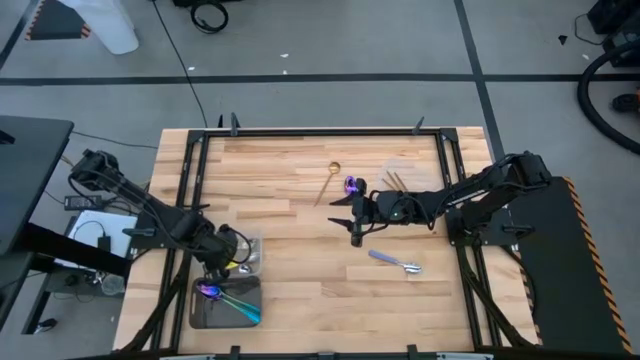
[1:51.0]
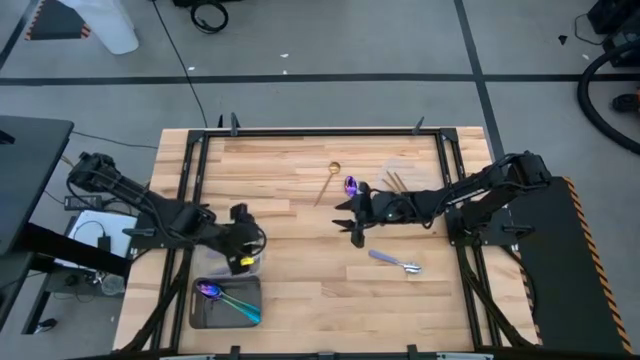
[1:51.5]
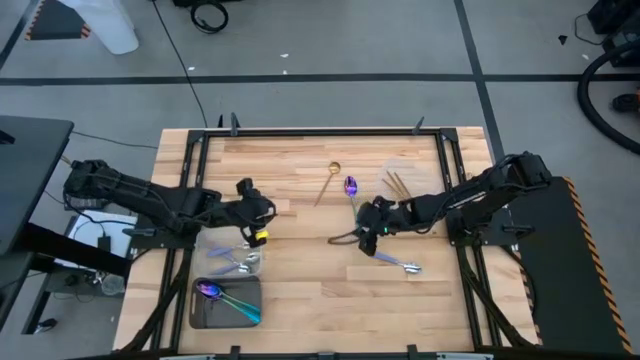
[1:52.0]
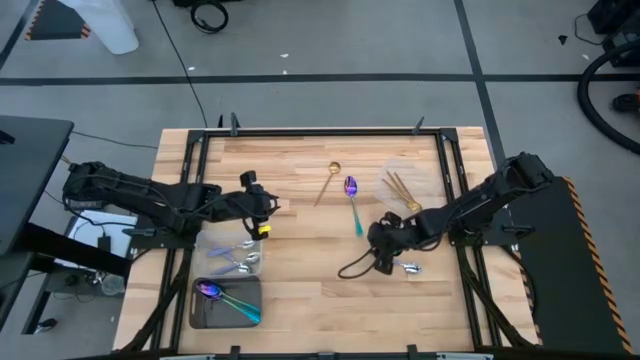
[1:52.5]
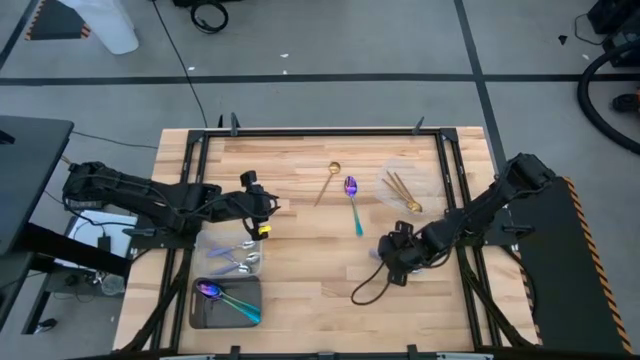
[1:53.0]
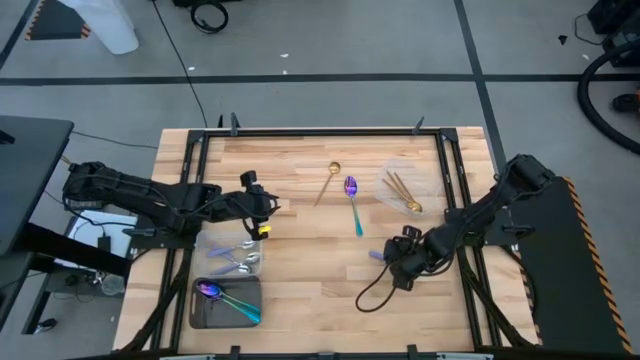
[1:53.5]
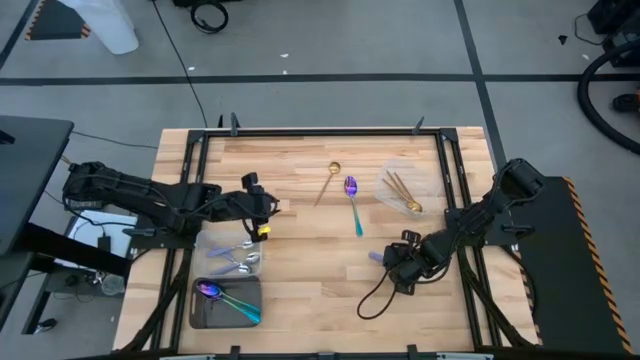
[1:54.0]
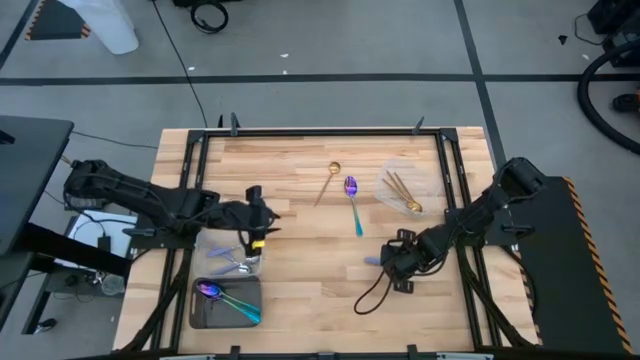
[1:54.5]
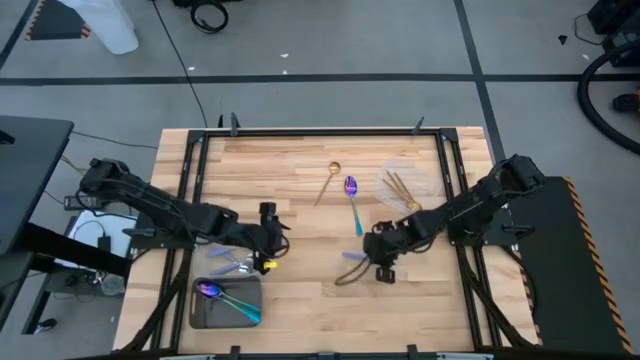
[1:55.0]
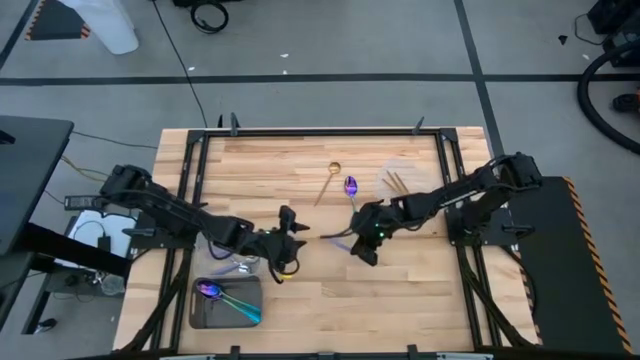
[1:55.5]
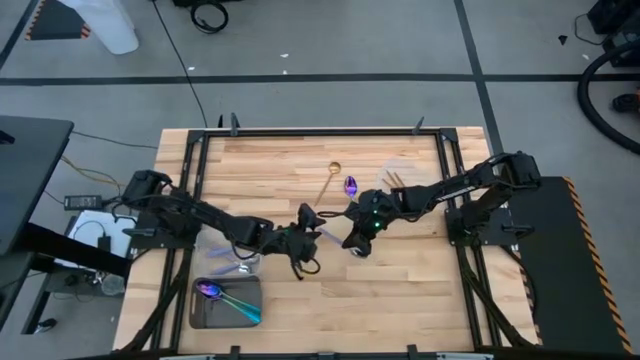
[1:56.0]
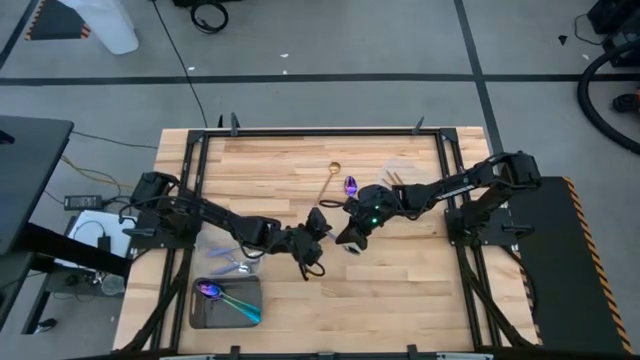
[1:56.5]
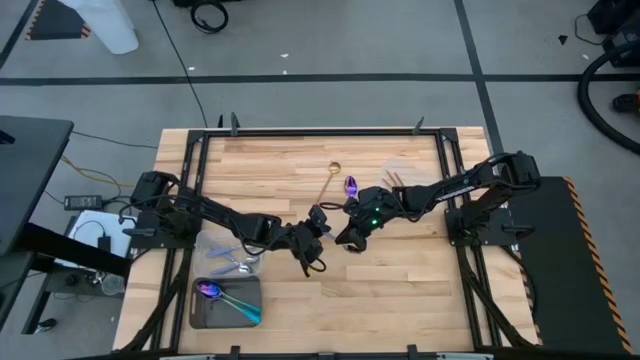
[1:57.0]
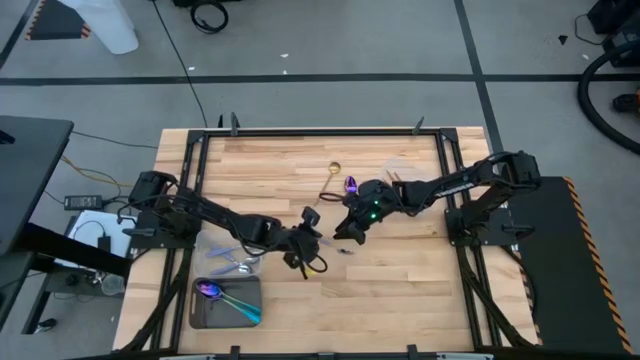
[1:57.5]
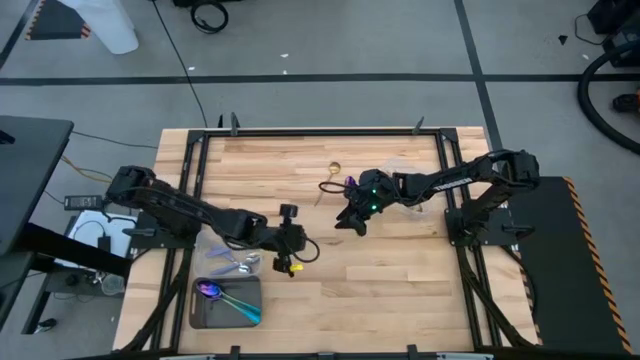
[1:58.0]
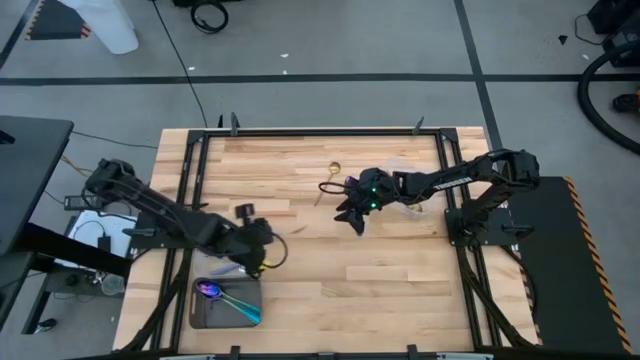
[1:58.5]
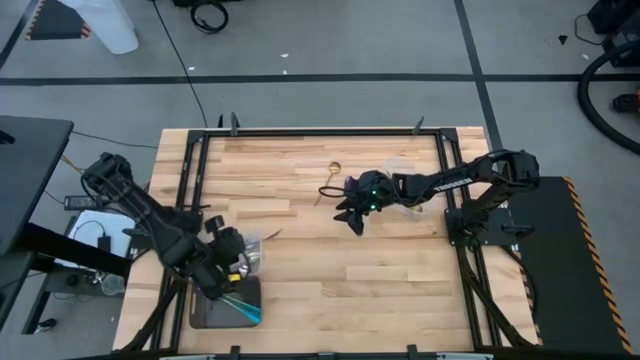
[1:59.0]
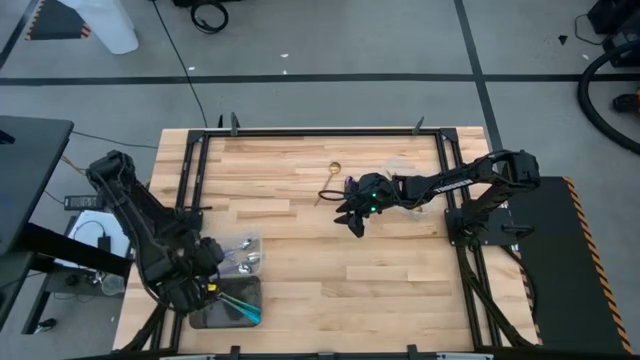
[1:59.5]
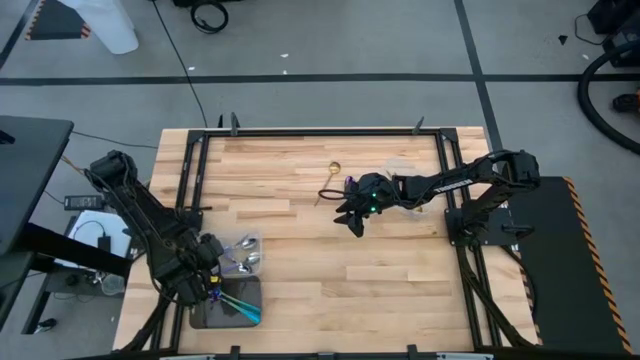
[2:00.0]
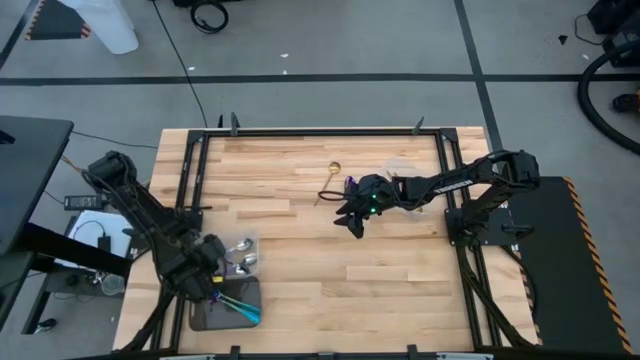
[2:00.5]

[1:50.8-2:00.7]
Task: Sort silverware by color (type)
Put the purple spoon into the bottom transparent bin

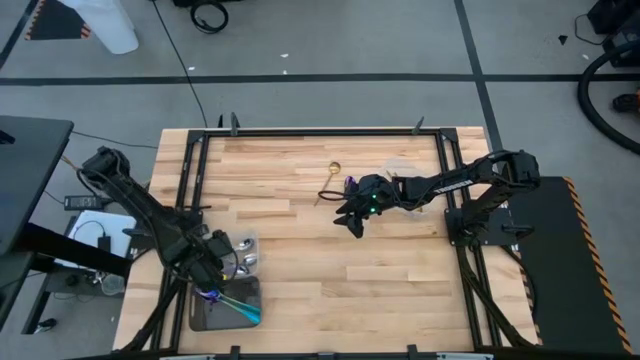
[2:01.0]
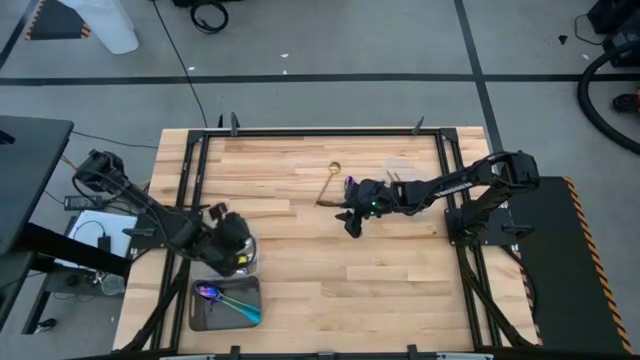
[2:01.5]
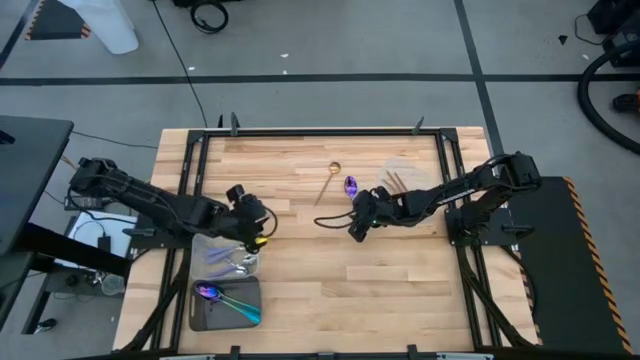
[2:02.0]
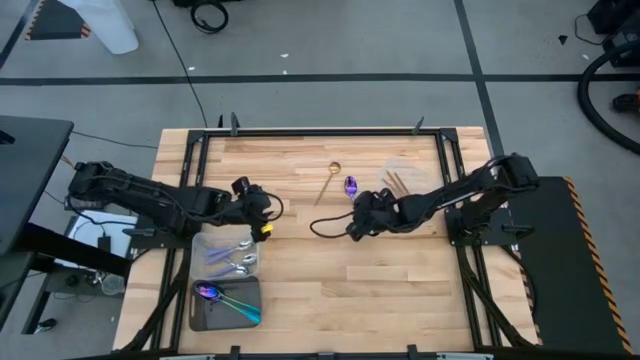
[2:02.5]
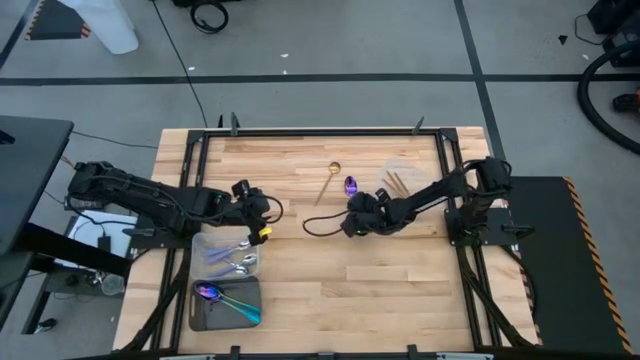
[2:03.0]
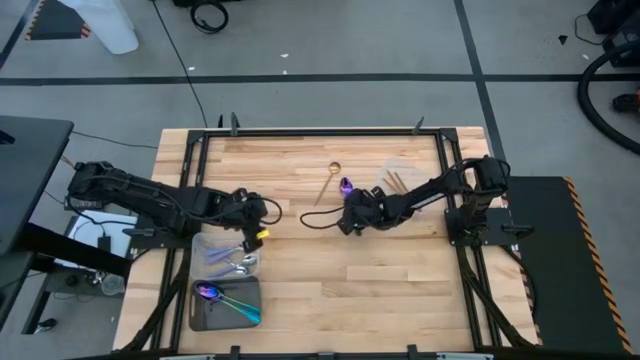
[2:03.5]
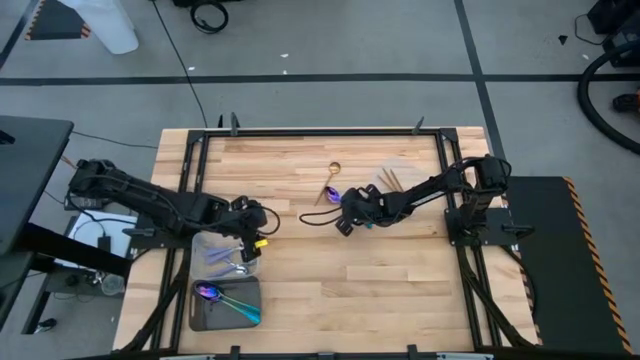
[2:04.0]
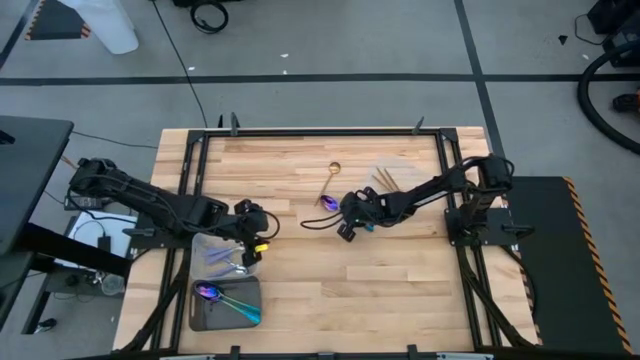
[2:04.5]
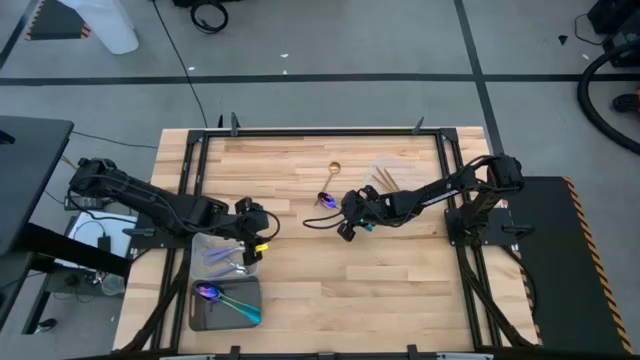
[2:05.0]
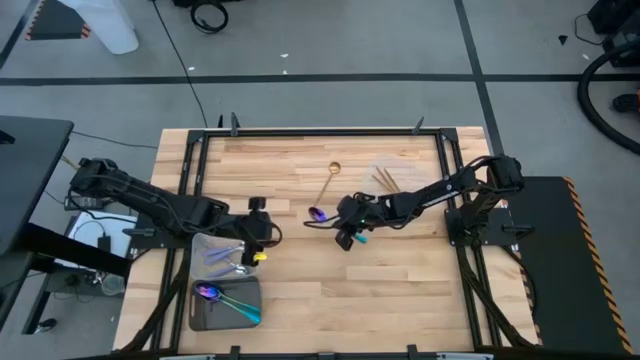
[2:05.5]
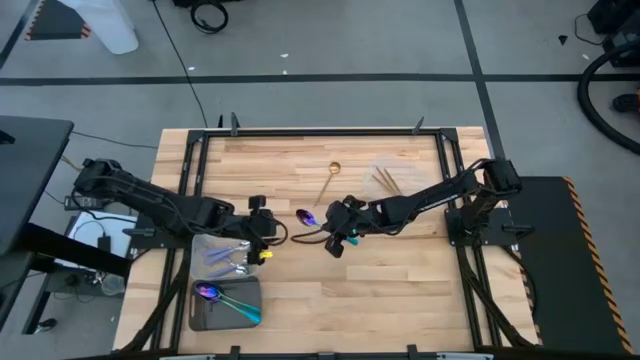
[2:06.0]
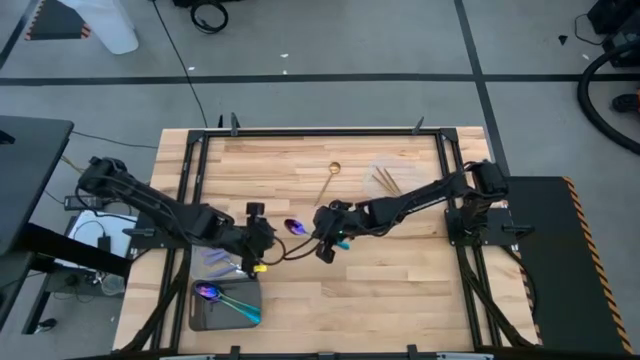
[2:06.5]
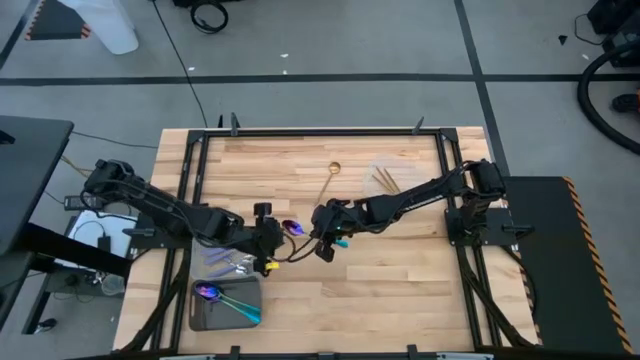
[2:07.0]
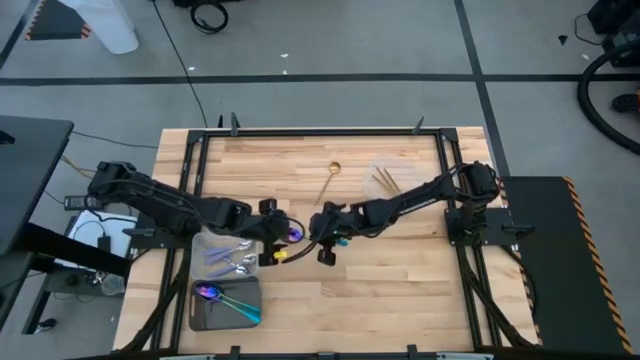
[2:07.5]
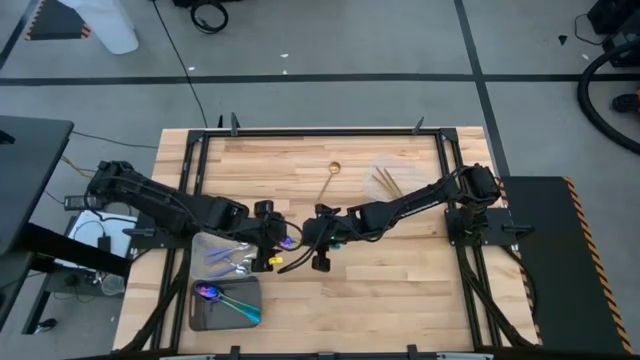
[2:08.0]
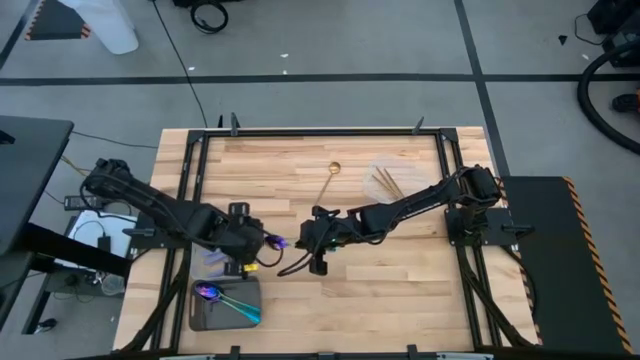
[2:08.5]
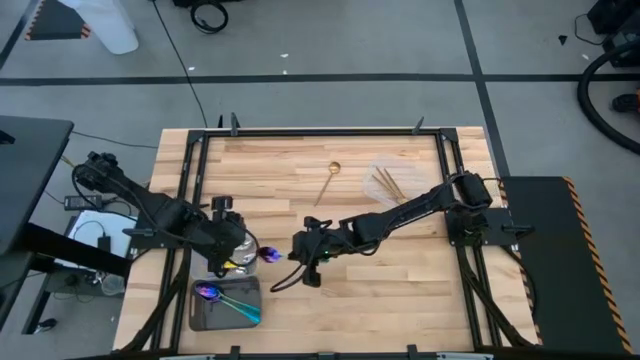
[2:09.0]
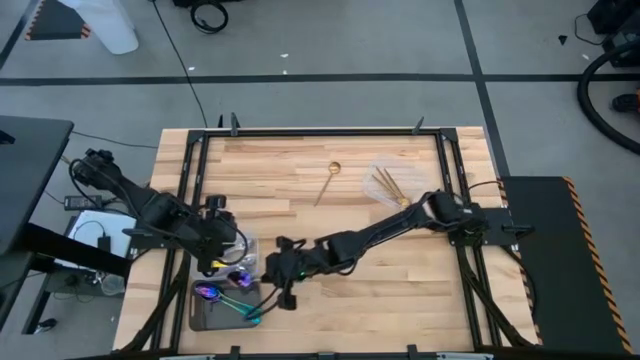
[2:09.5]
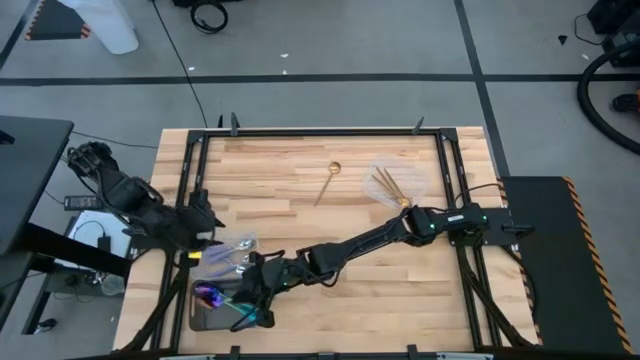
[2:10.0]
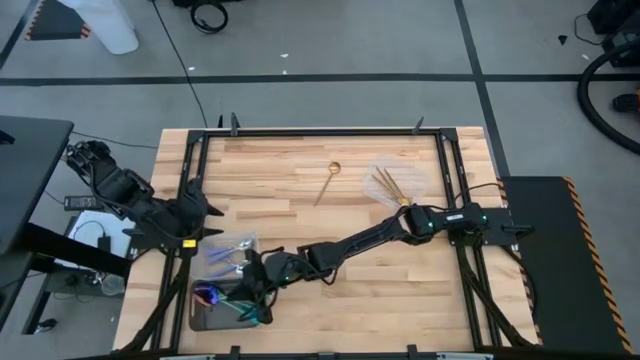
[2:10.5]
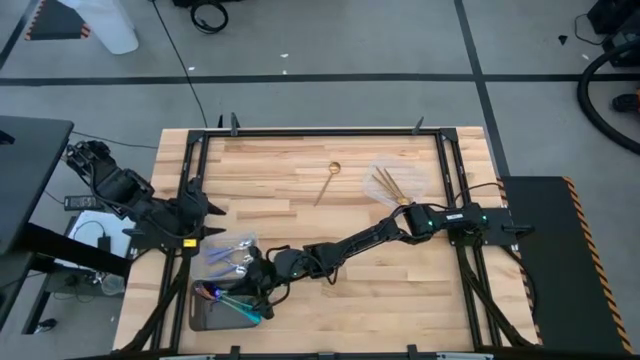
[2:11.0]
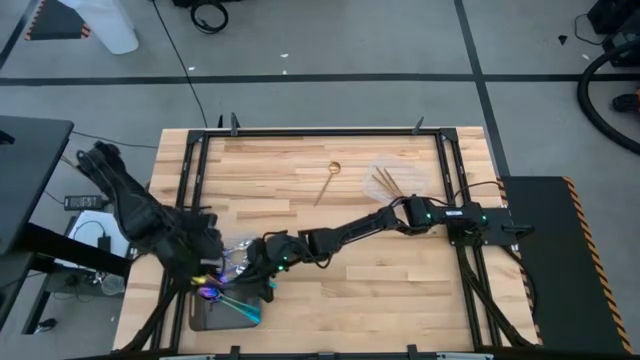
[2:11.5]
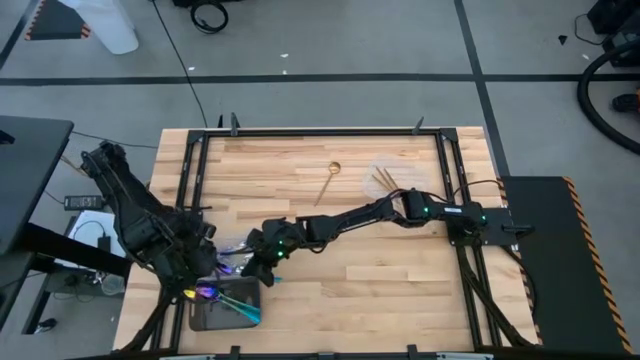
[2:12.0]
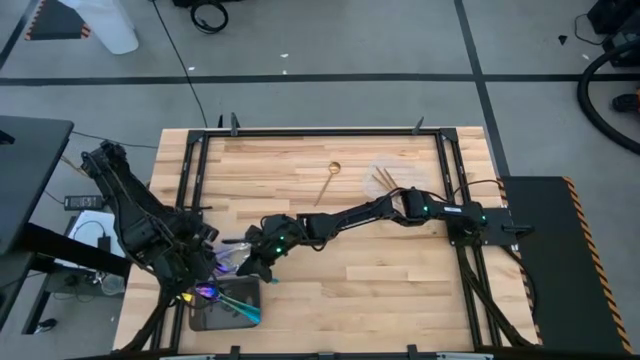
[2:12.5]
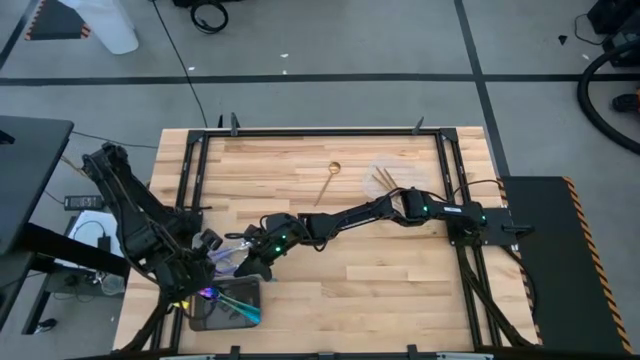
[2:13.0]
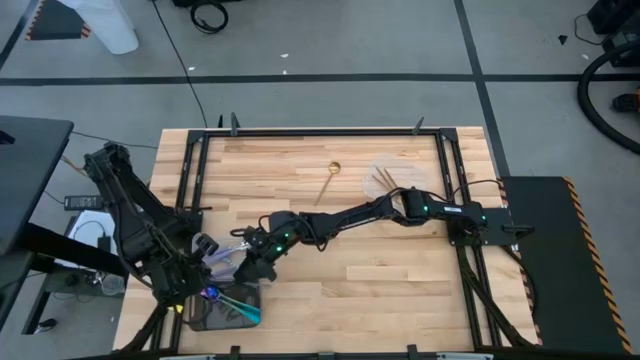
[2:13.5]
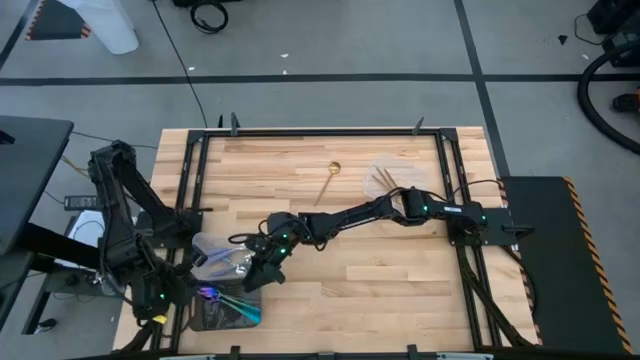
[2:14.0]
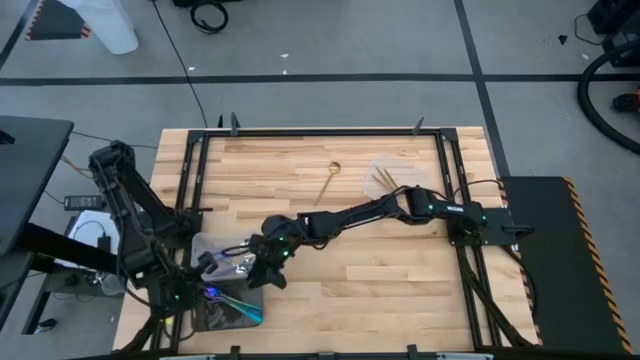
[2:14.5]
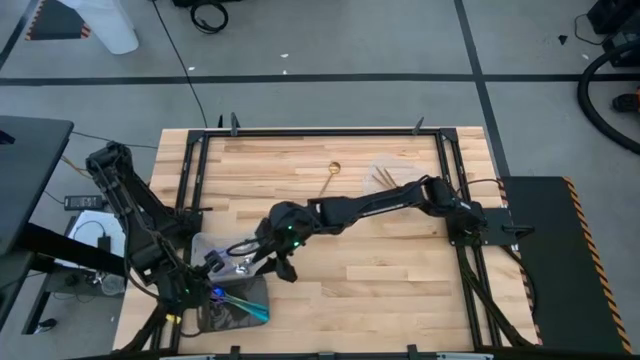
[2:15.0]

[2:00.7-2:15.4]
Put the blue spoon into the black bin
